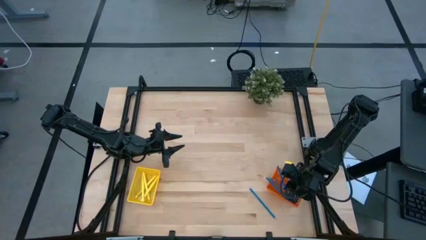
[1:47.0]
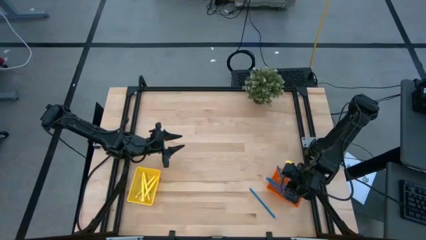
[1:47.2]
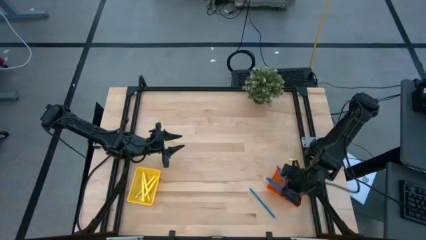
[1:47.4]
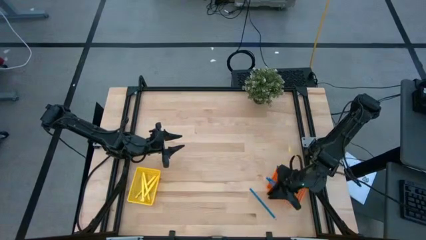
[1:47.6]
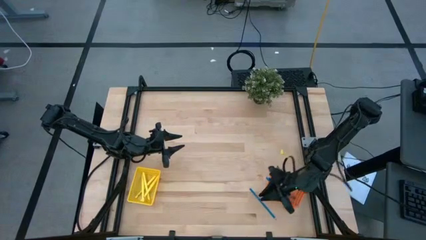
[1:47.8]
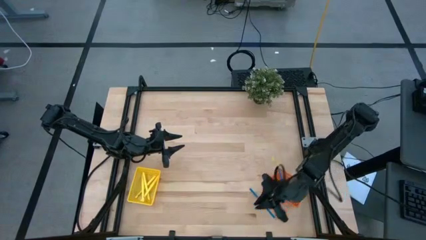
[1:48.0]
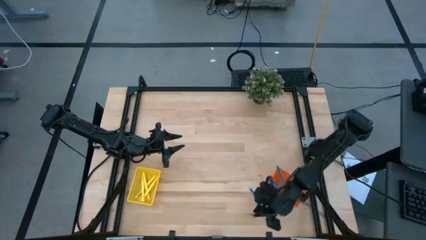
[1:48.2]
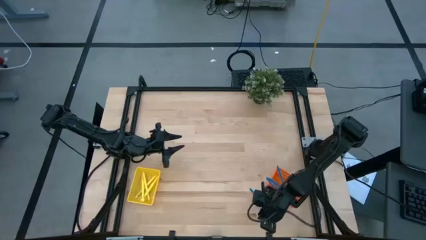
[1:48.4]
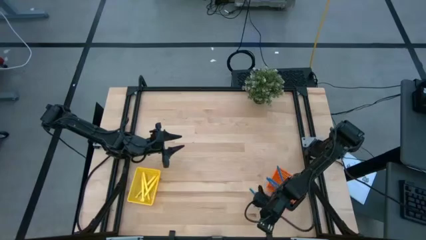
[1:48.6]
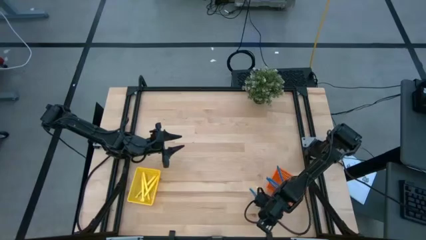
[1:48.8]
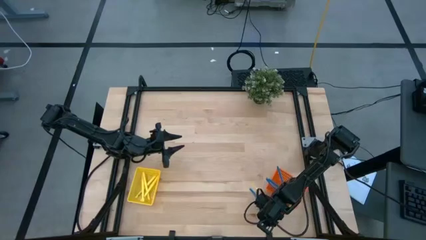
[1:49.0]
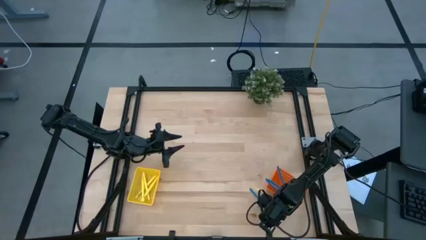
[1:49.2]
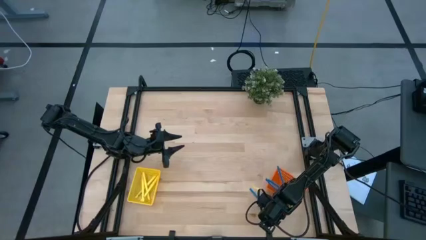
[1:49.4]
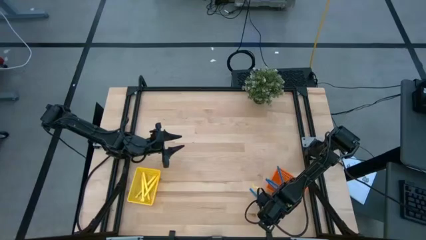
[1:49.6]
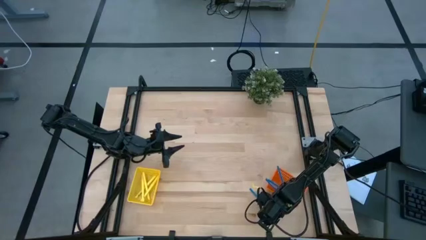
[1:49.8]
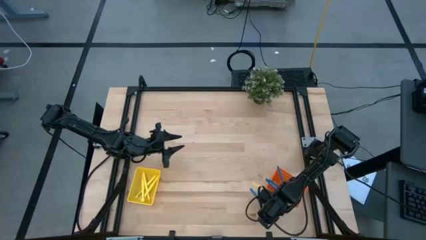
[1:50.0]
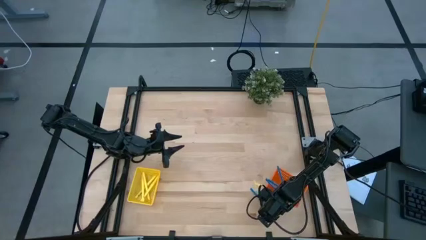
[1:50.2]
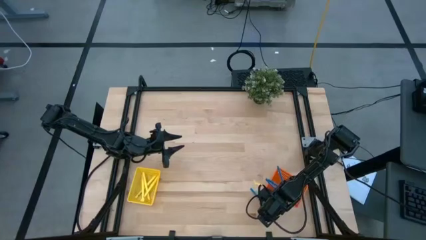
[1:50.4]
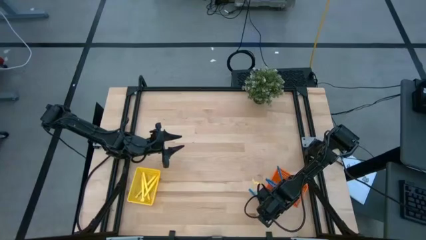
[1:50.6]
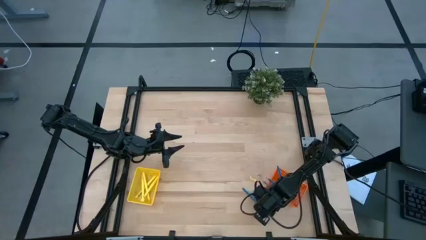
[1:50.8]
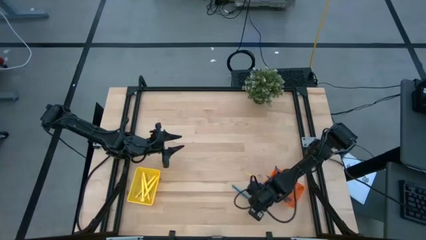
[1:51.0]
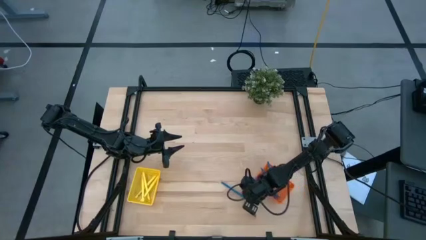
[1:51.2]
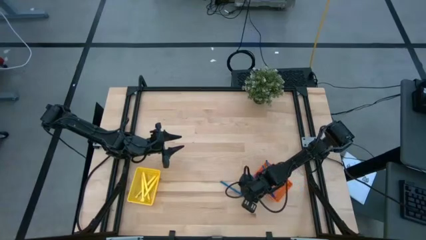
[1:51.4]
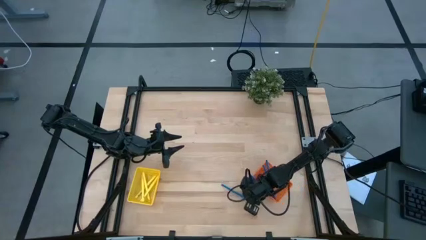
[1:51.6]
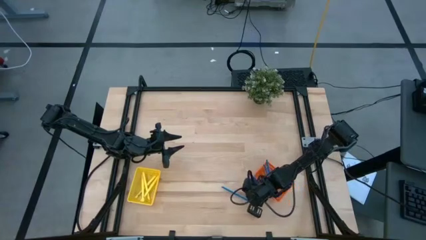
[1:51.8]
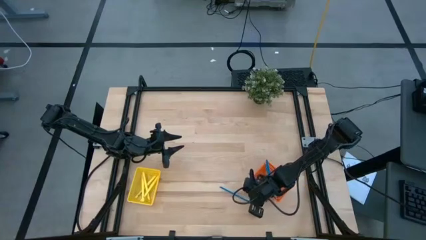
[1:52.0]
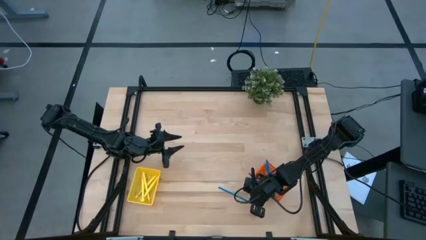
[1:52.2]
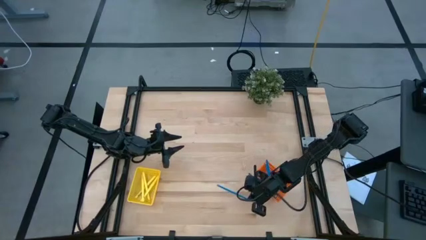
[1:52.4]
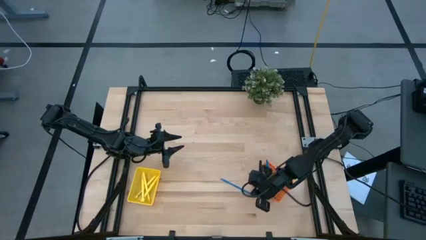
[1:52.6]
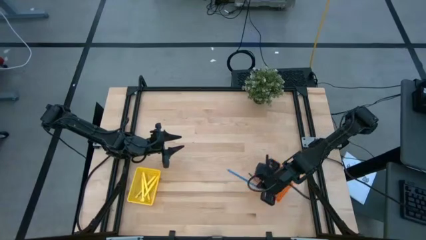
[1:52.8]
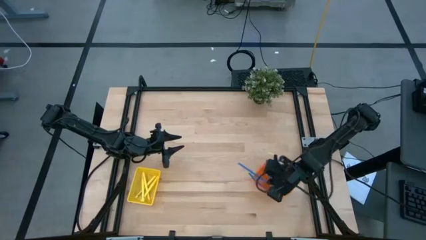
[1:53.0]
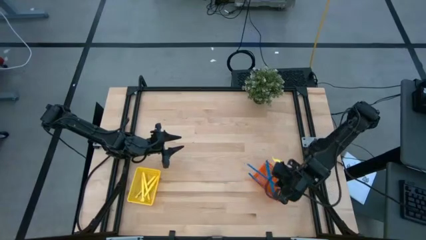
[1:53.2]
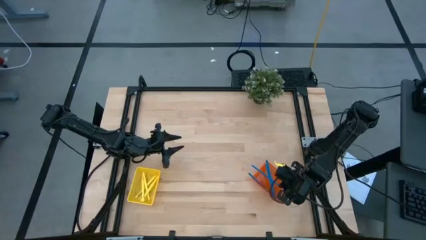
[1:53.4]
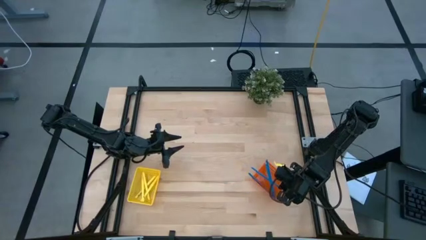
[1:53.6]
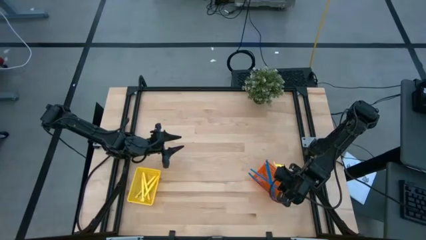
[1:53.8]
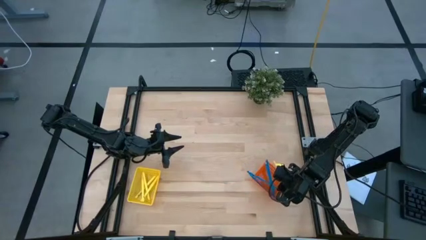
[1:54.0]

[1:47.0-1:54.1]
Task: Sort pens & pencils
Put the blue pencil into the orange bin

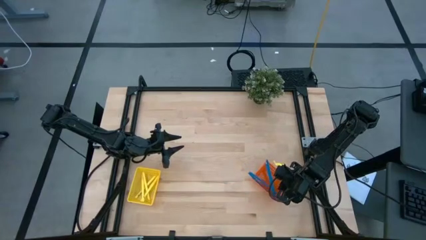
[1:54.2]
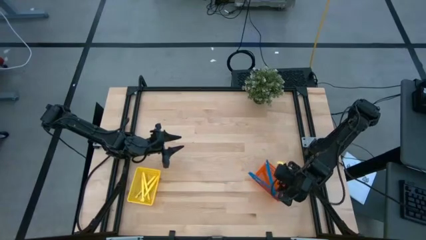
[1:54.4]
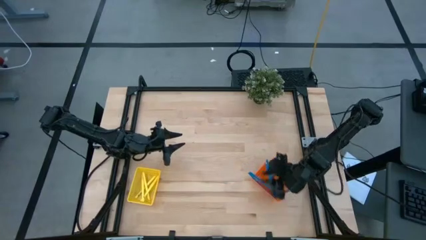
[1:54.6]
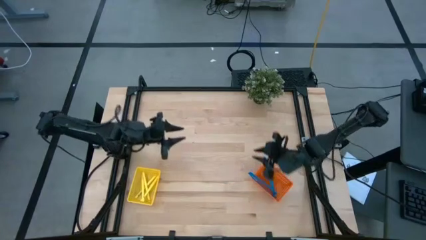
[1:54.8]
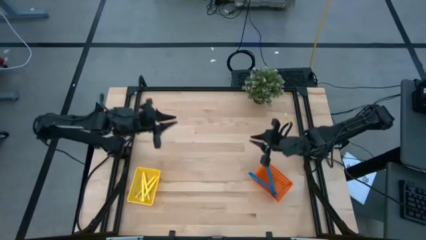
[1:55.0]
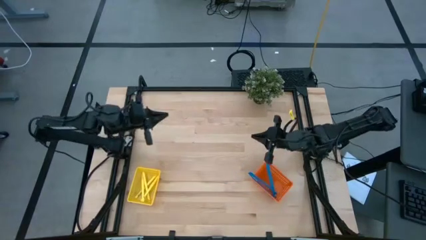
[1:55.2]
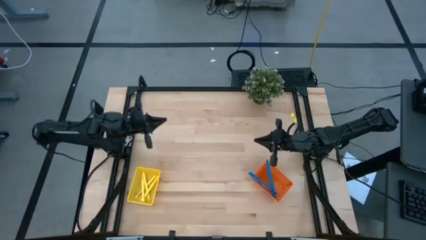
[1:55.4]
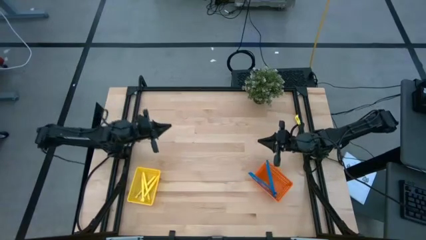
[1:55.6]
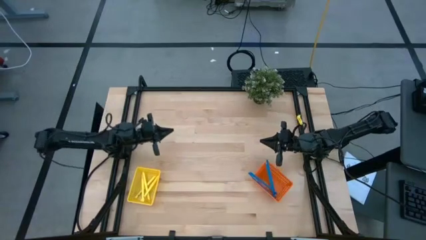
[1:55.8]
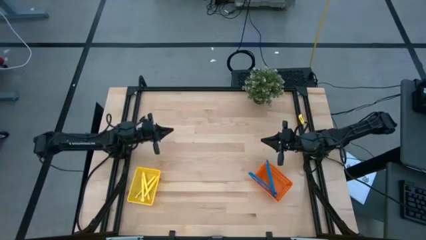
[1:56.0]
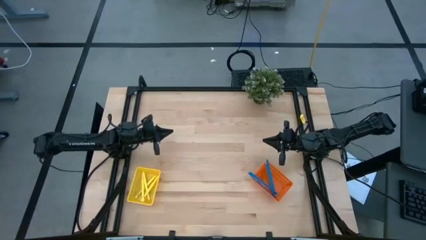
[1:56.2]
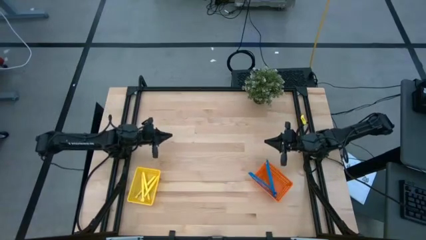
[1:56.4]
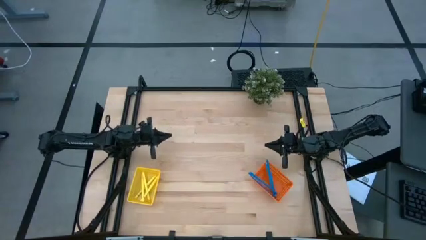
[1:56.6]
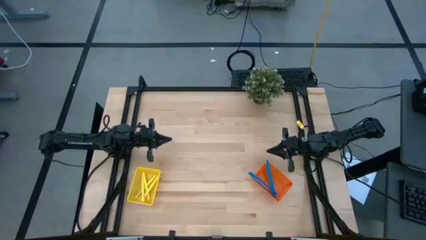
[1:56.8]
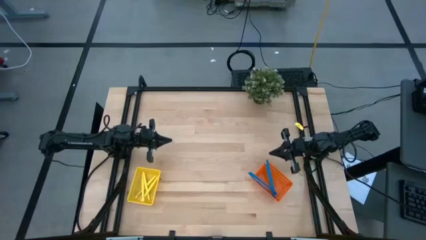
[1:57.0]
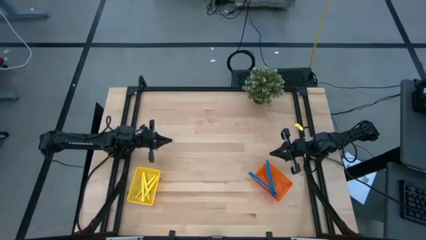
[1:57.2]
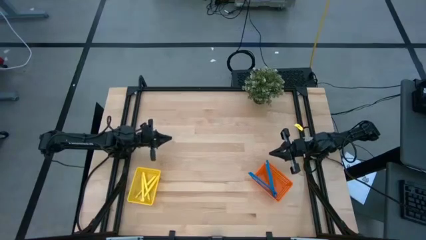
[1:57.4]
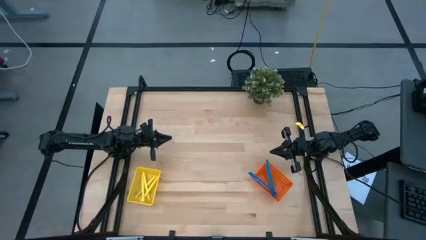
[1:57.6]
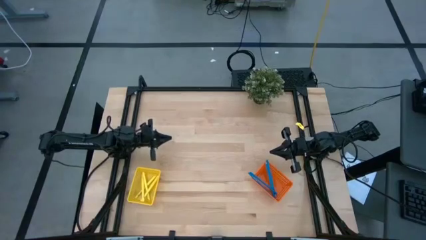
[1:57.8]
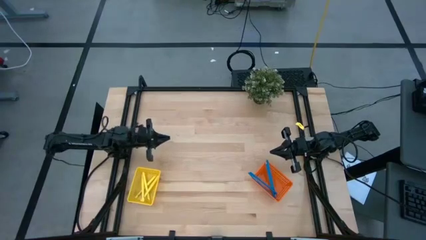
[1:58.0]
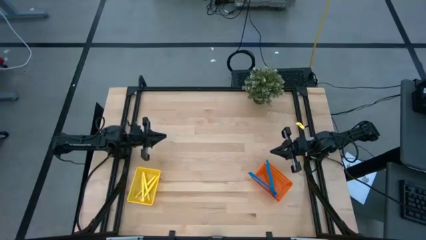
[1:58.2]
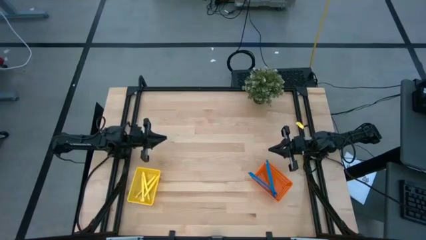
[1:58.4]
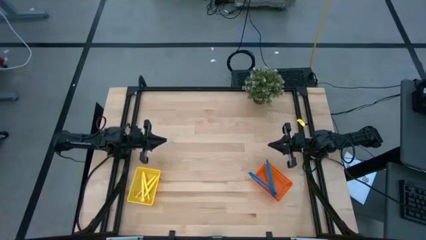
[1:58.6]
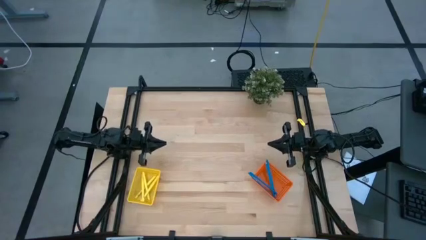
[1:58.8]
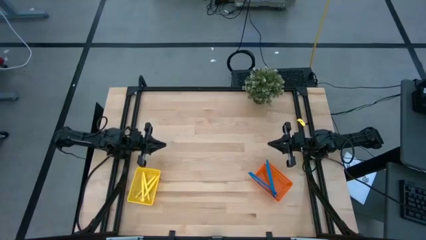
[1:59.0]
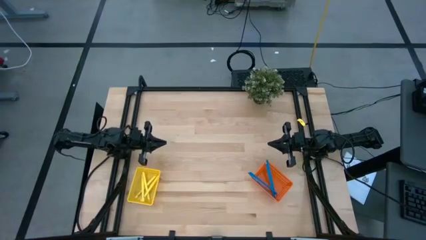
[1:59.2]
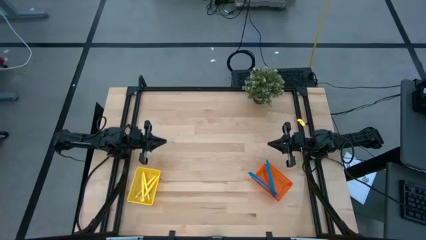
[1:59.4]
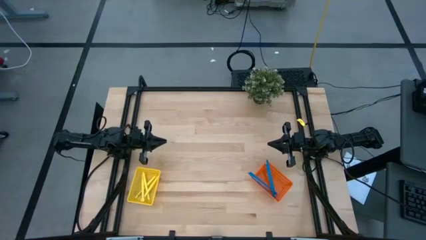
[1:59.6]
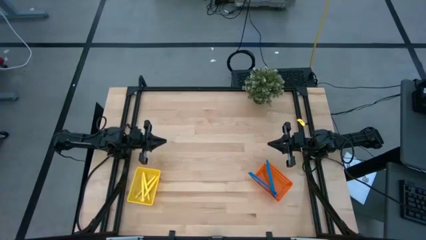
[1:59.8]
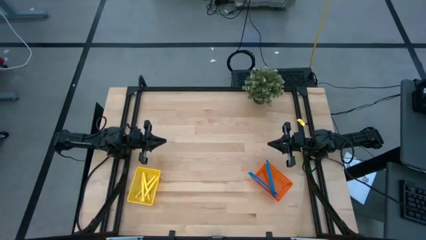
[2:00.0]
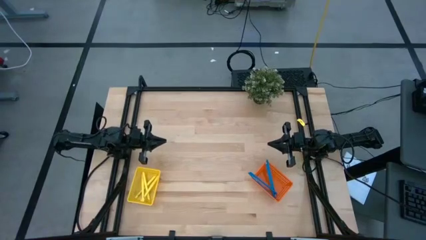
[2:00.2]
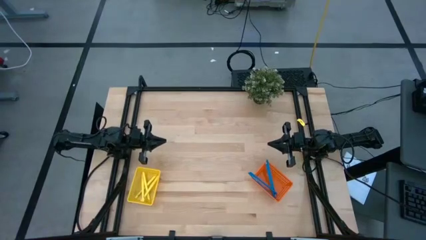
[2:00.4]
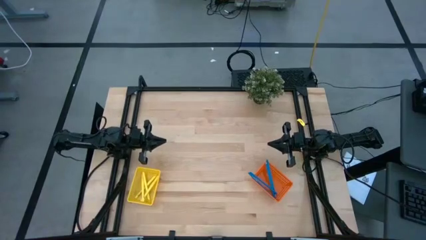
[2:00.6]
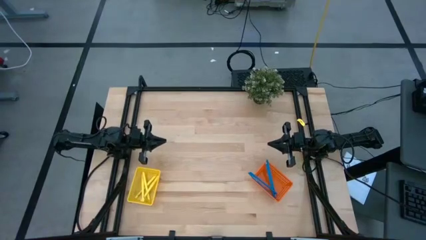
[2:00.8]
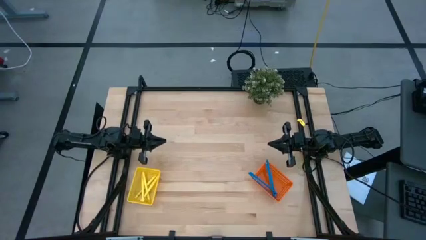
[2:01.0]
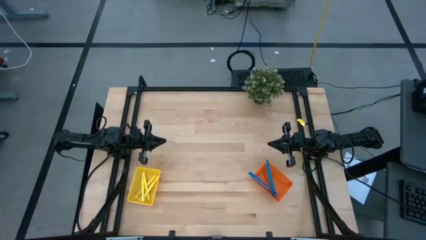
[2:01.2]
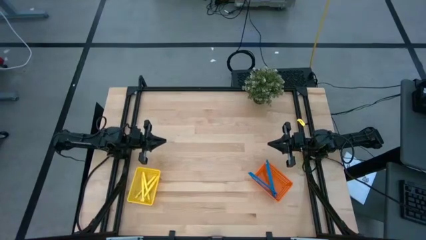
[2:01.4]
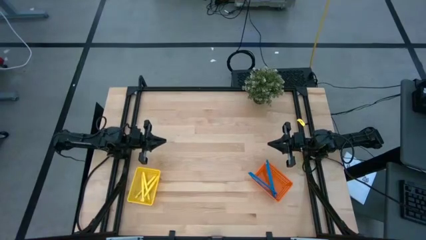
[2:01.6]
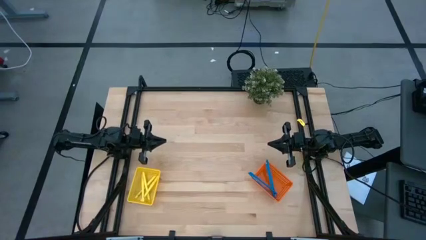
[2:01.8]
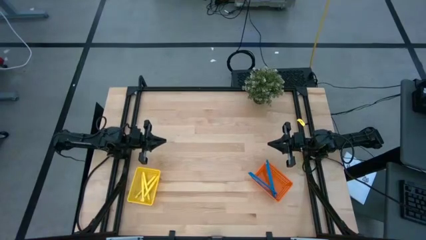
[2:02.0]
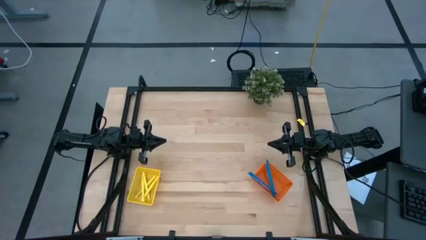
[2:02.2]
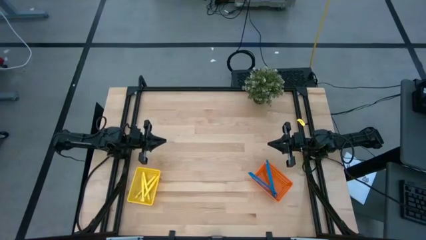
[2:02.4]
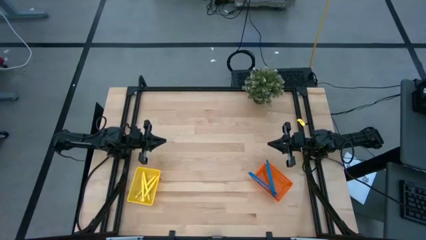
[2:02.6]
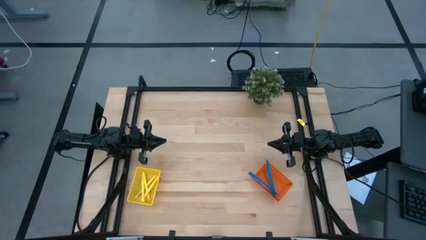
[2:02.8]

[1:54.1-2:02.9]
Return to Home Position
